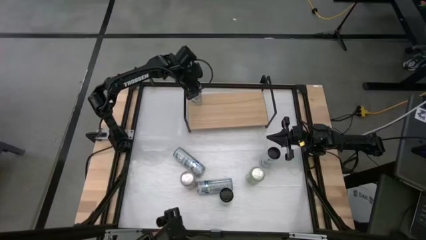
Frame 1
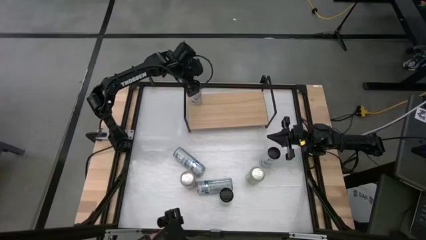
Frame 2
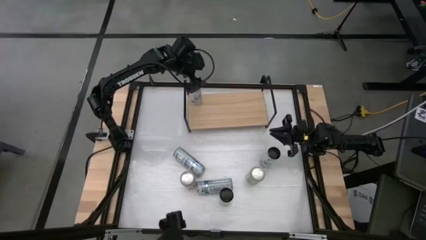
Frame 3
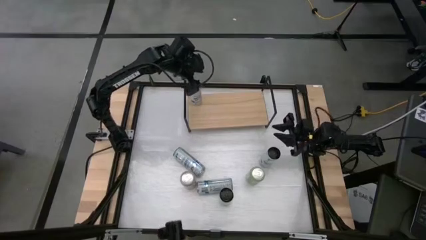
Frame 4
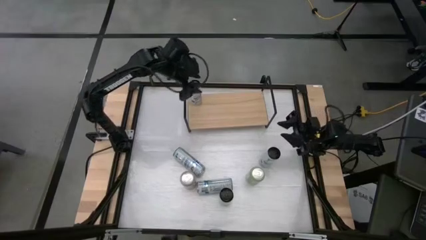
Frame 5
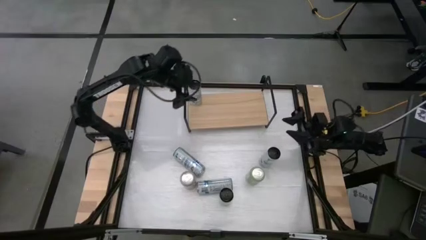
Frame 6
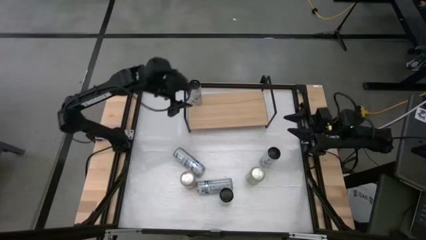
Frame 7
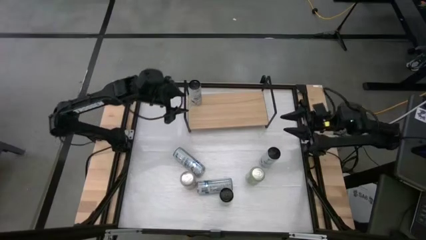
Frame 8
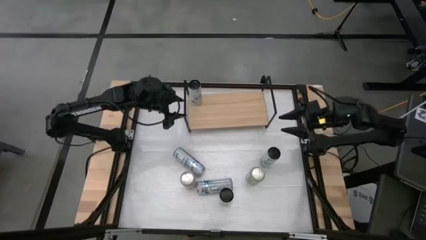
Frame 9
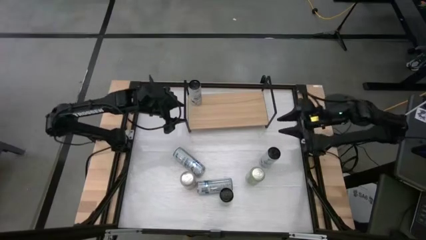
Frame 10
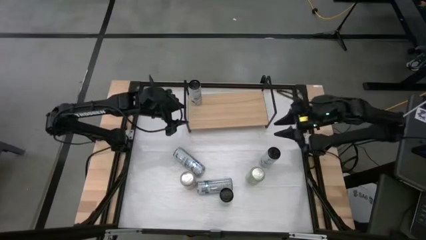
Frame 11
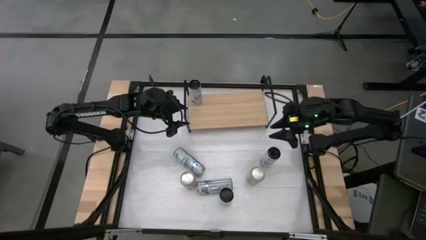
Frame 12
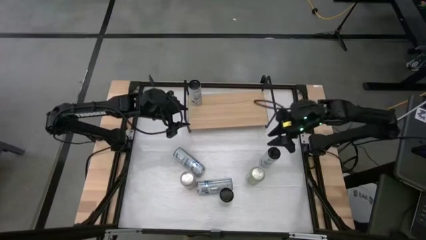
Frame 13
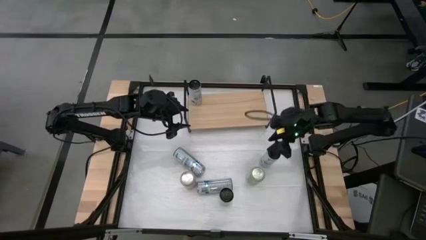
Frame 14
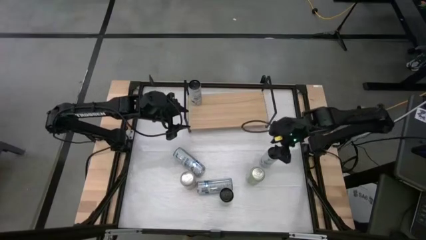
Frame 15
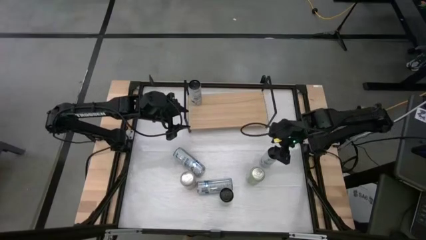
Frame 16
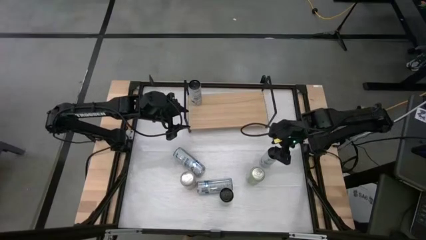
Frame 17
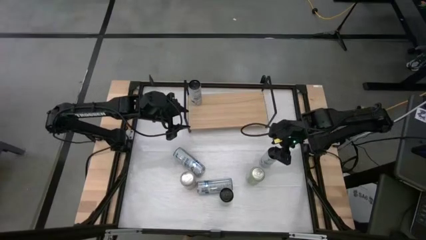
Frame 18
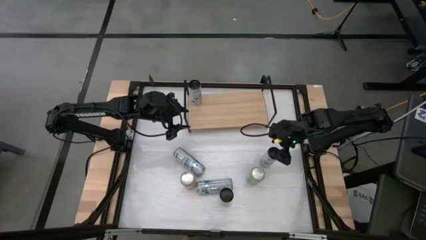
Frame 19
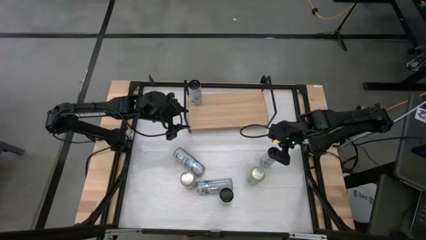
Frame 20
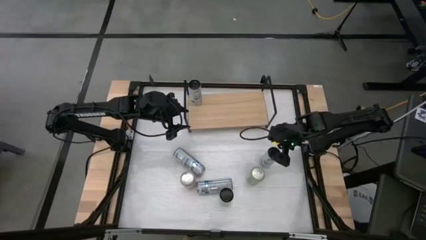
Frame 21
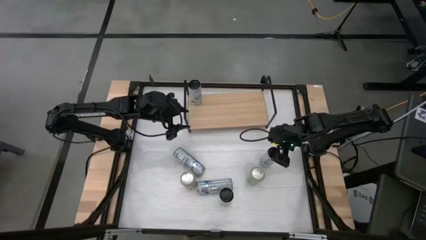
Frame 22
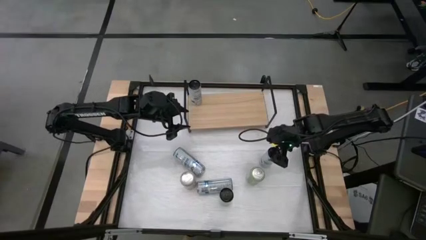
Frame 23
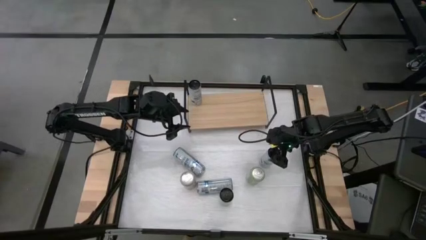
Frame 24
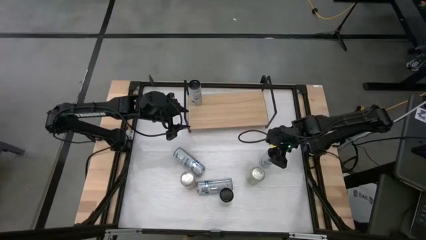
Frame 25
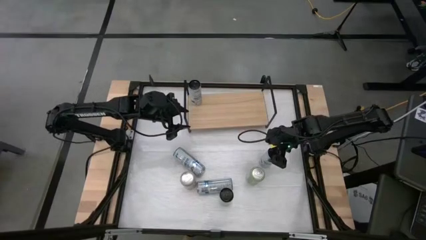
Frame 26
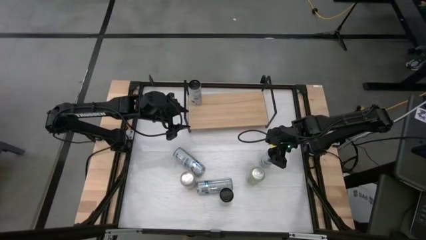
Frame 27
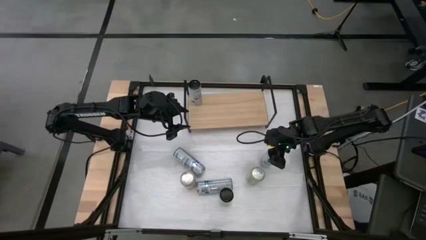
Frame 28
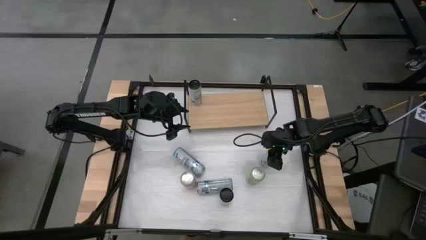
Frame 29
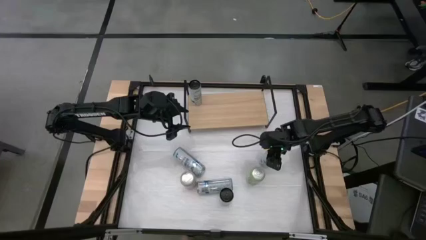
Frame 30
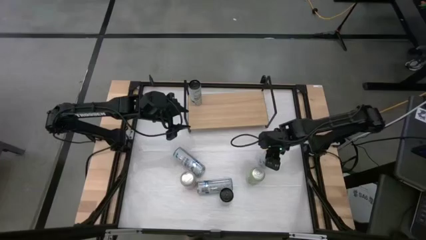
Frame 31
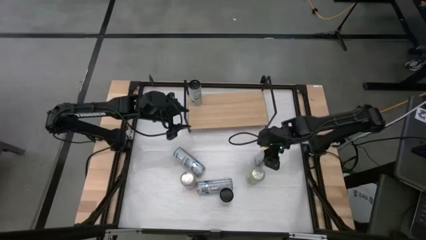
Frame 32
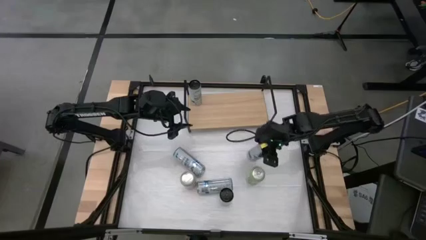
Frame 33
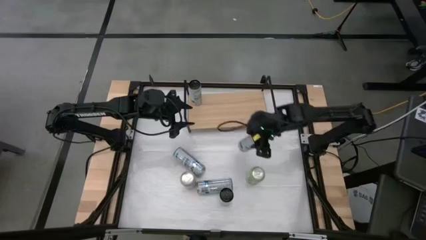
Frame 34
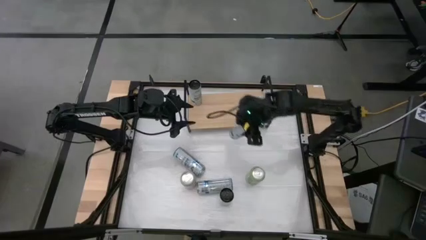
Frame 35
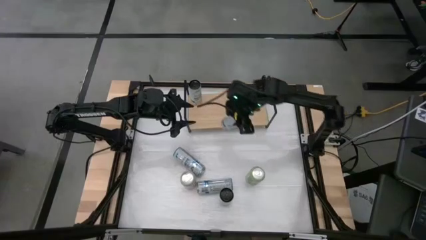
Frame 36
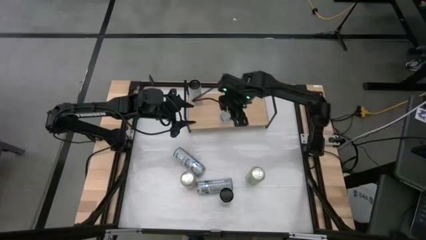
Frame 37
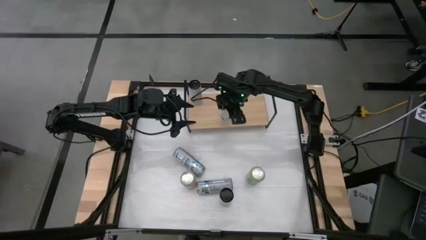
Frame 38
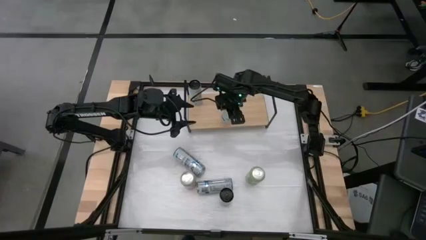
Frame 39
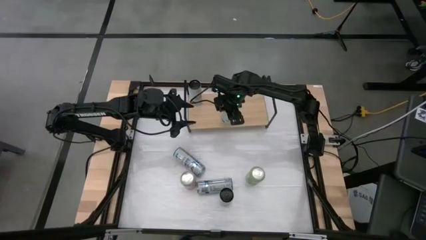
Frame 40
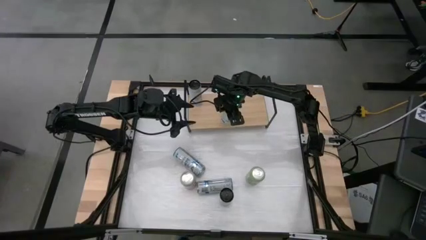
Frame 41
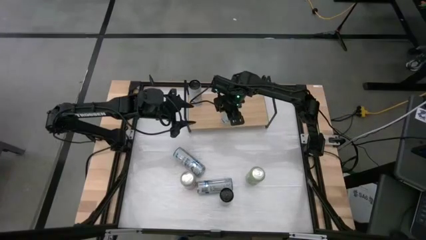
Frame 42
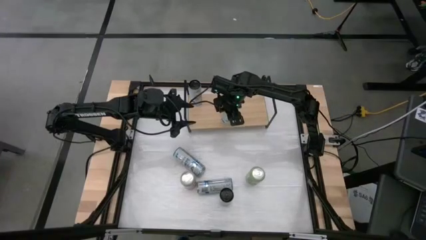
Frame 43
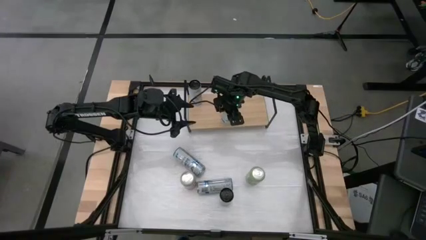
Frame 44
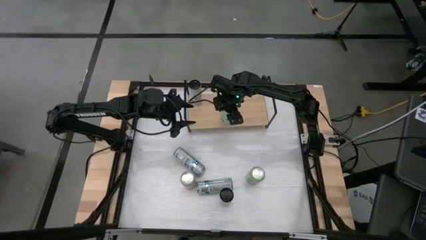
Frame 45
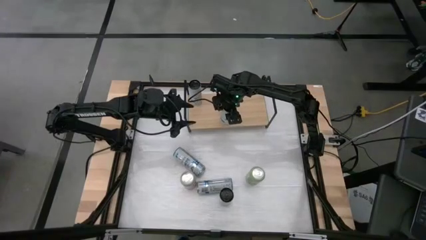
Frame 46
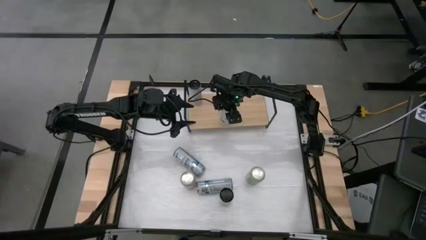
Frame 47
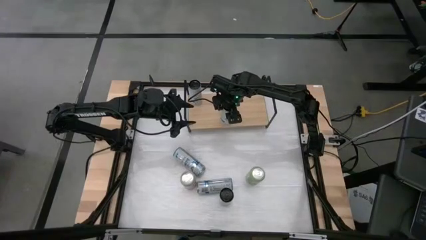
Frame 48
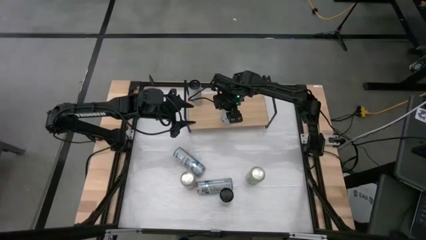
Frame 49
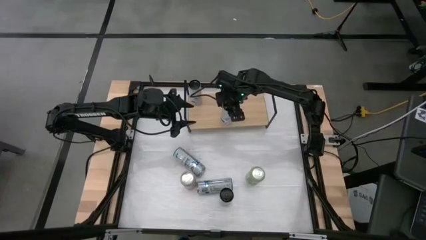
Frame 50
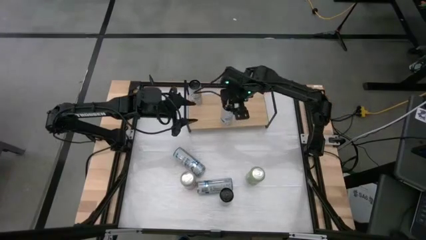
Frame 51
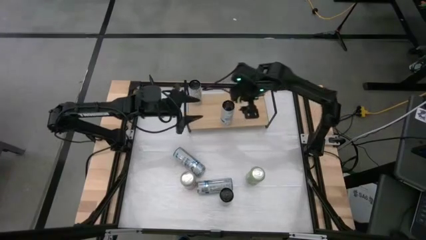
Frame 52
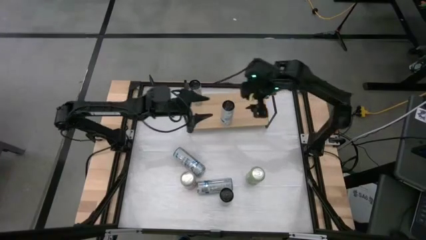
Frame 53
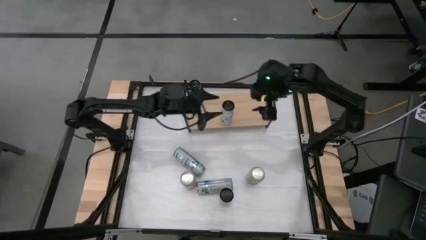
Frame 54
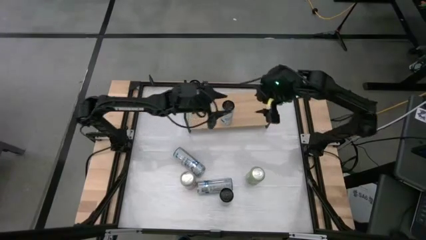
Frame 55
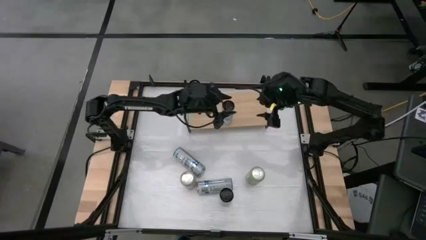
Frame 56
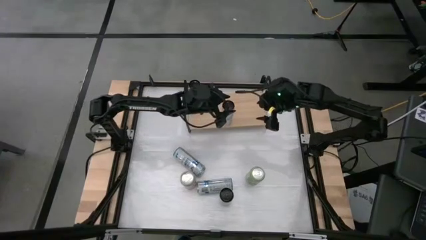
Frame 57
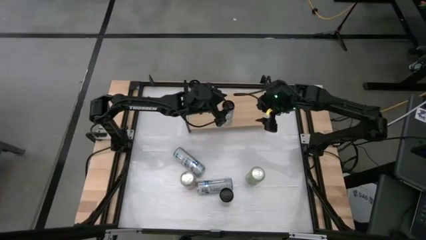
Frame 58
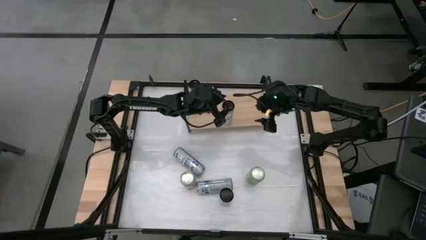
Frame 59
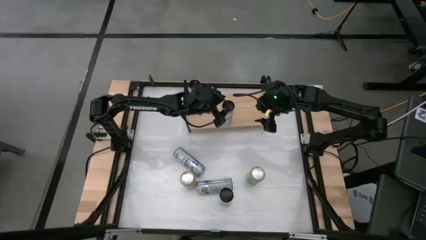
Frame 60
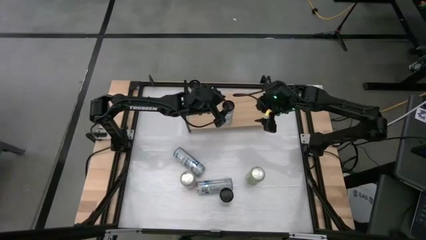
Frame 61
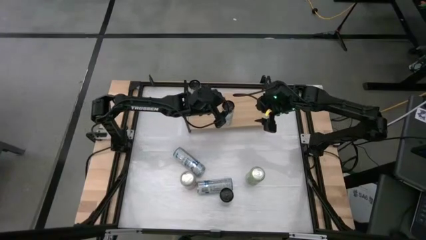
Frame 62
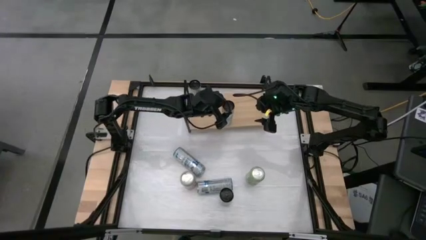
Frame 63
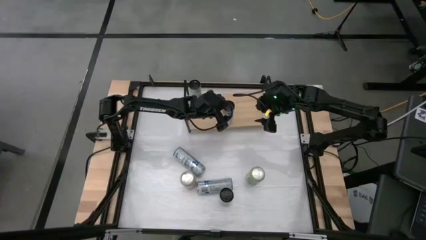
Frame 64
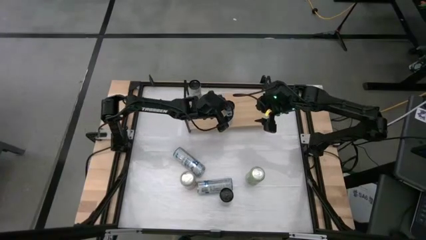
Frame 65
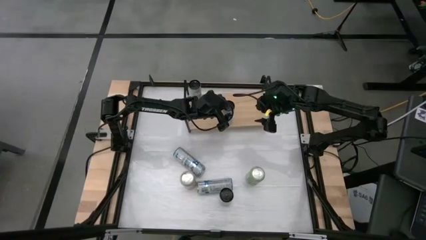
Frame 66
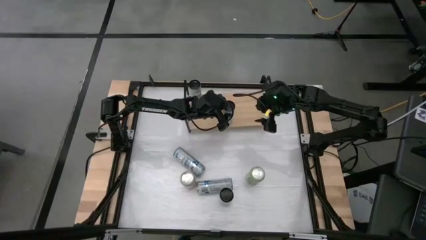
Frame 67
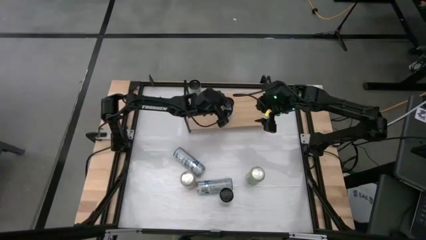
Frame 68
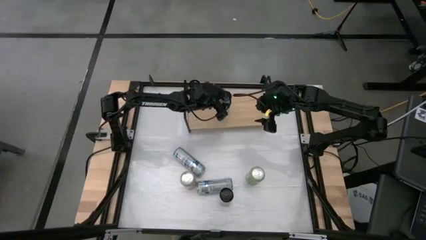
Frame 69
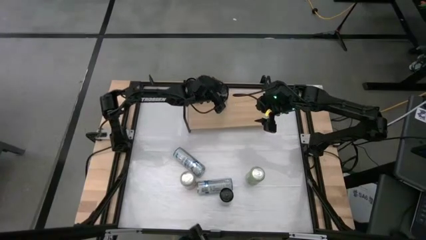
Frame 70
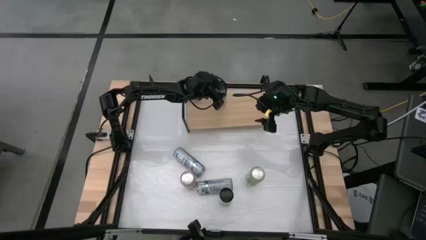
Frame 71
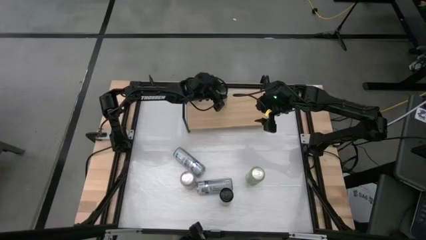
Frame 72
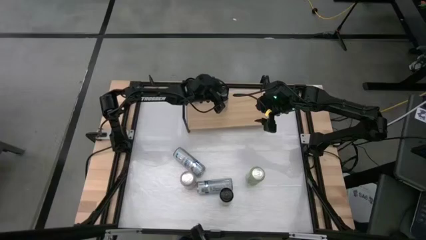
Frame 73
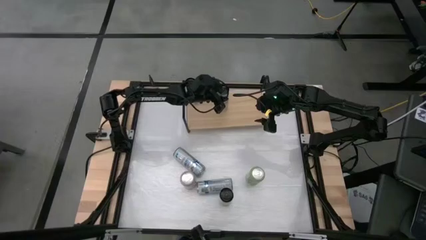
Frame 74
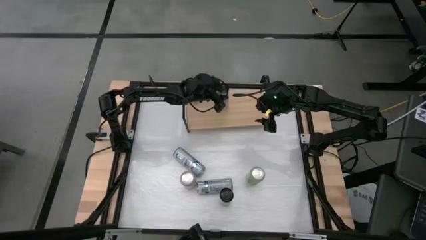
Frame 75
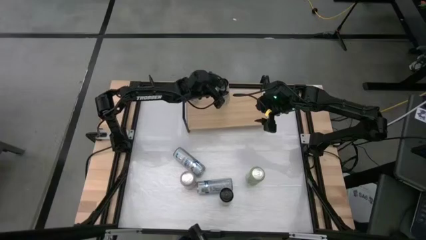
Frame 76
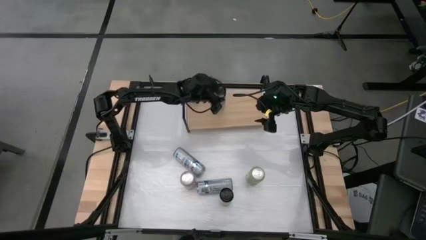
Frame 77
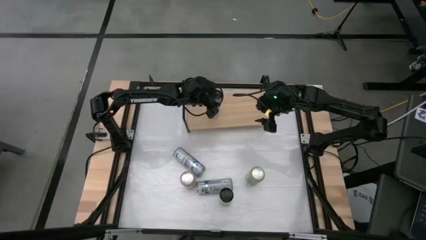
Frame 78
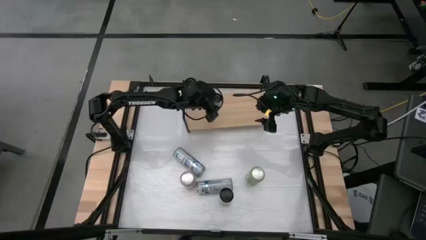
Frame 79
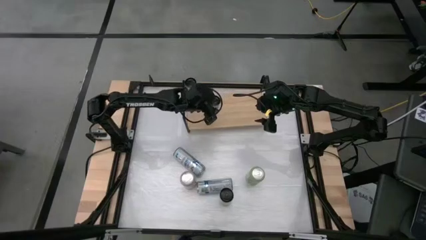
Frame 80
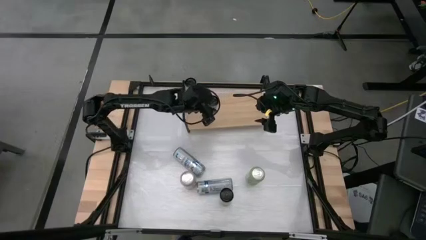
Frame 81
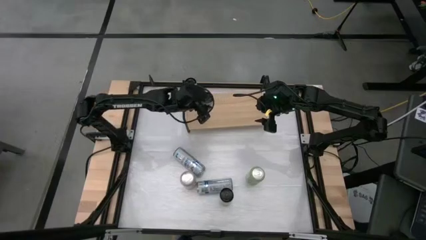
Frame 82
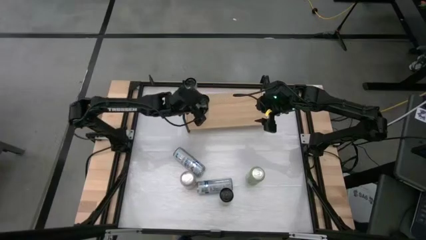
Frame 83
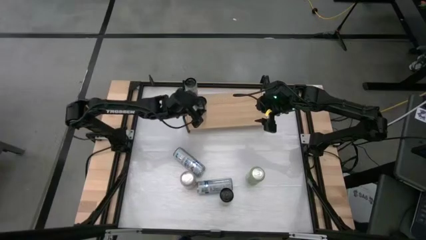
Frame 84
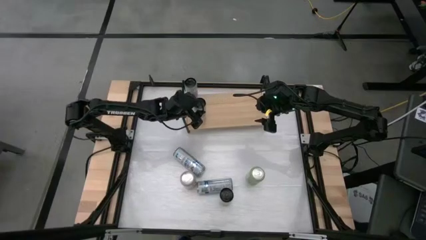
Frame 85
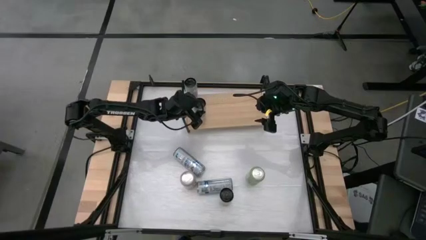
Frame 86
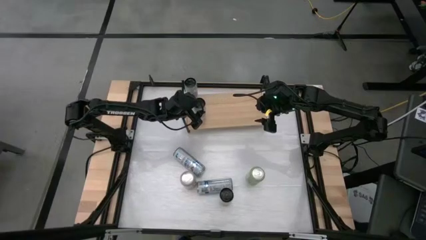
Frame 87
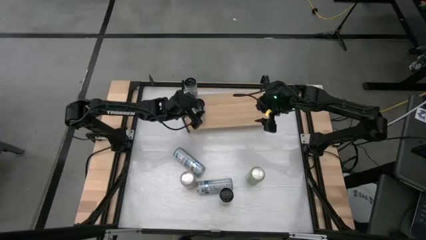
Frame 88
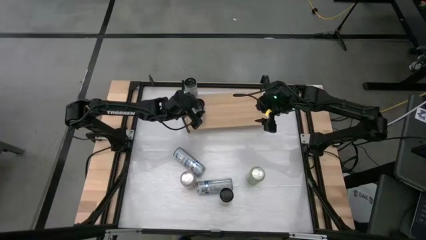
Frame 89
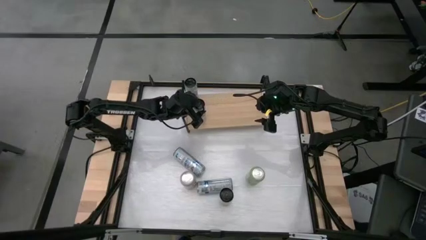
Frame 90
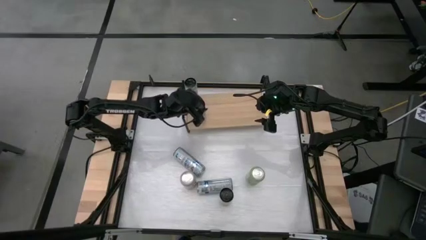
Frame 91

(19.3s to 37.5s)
Task: Place canned beverage on shelf
Put the white-blue soda can aligned with the other white-blue soda can on the shelf
